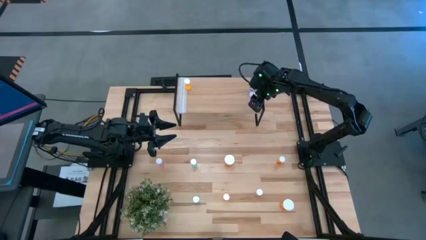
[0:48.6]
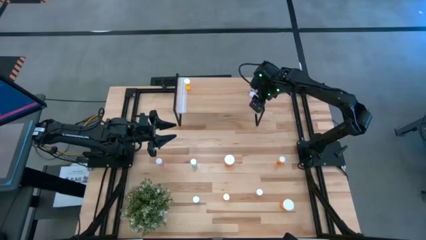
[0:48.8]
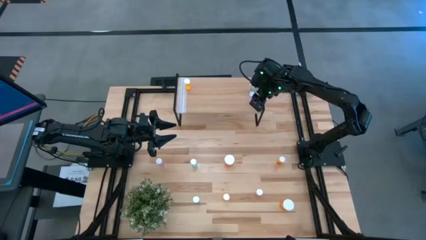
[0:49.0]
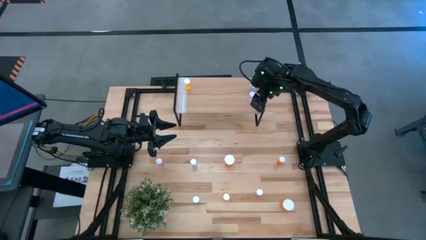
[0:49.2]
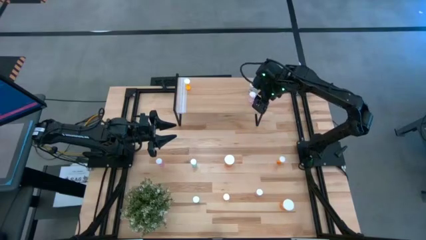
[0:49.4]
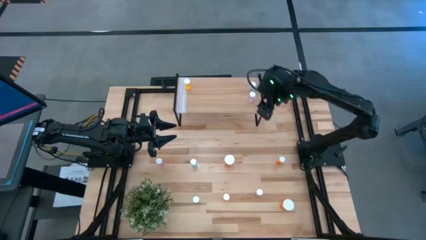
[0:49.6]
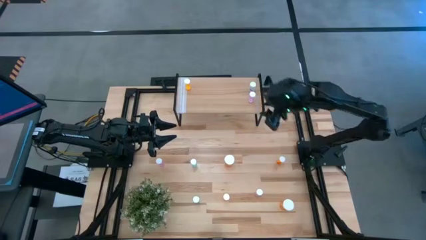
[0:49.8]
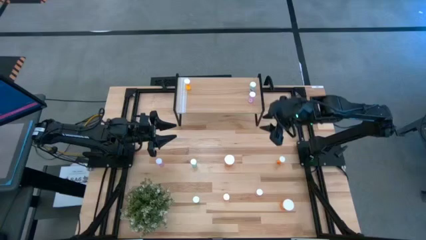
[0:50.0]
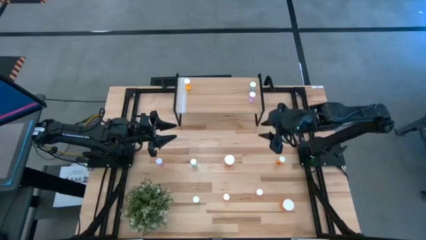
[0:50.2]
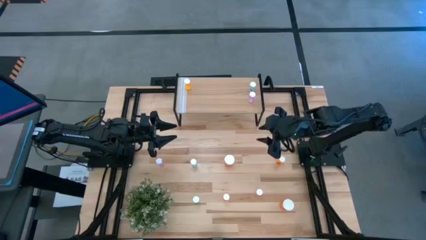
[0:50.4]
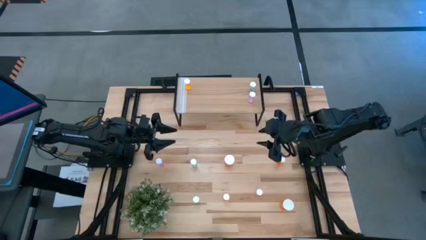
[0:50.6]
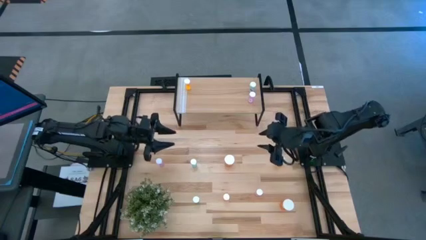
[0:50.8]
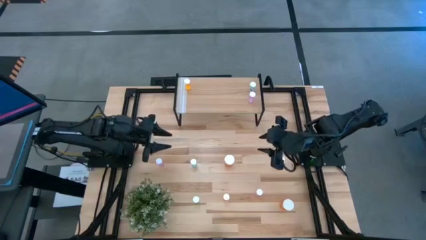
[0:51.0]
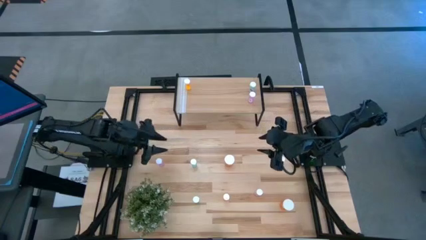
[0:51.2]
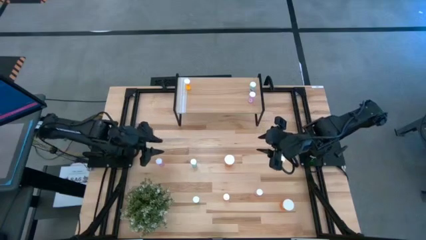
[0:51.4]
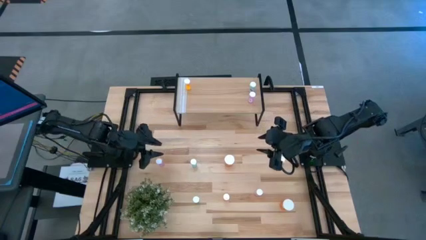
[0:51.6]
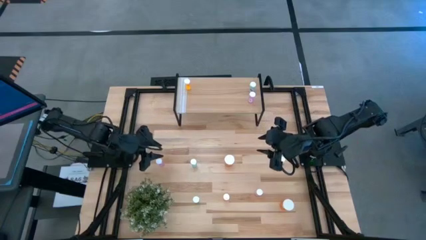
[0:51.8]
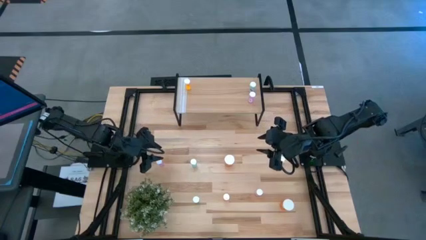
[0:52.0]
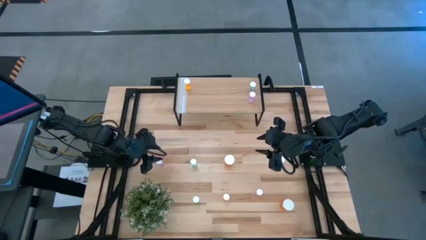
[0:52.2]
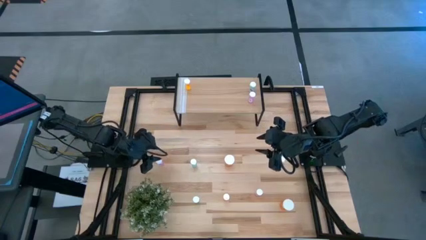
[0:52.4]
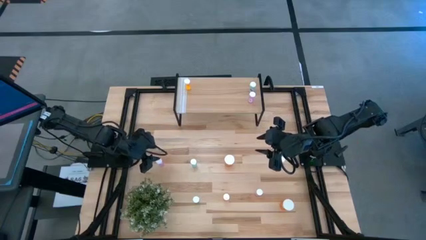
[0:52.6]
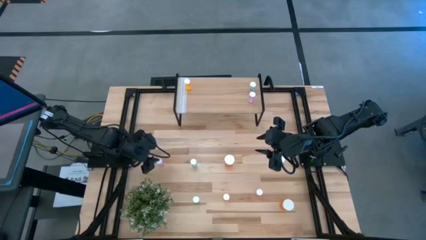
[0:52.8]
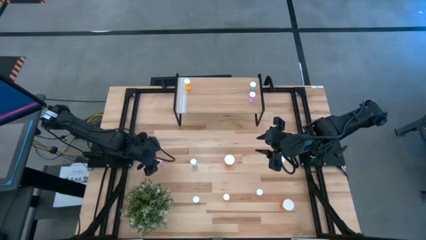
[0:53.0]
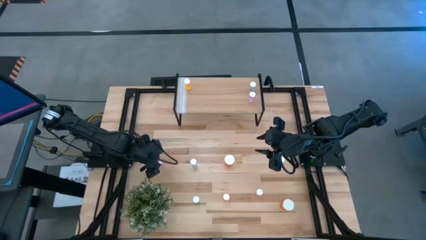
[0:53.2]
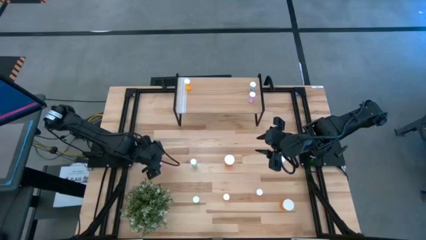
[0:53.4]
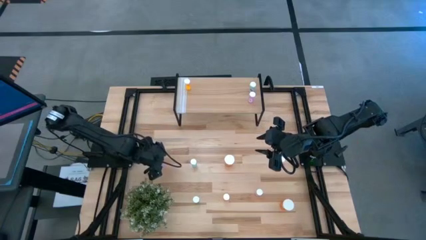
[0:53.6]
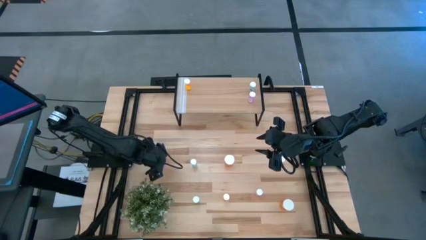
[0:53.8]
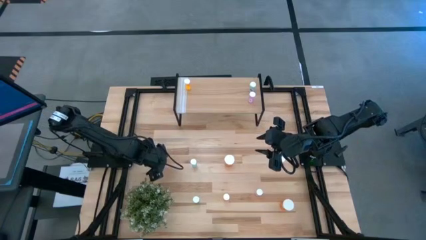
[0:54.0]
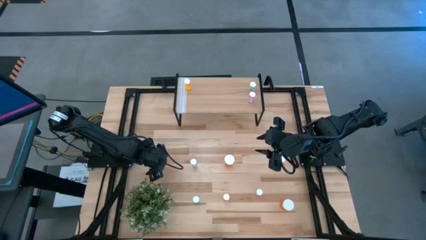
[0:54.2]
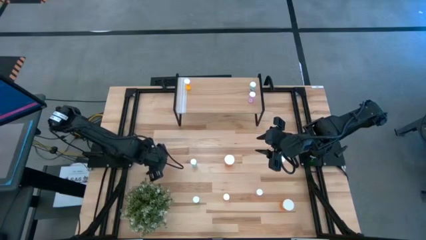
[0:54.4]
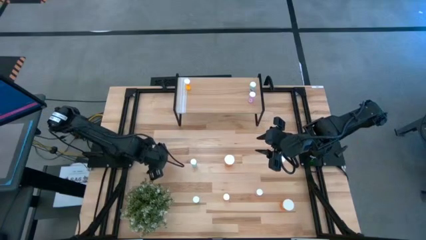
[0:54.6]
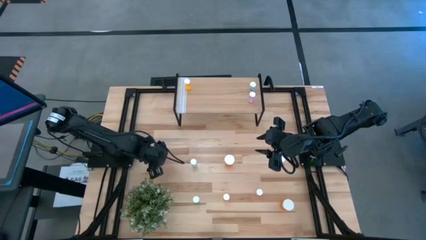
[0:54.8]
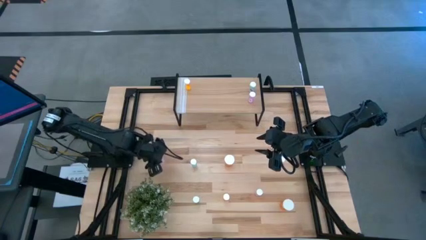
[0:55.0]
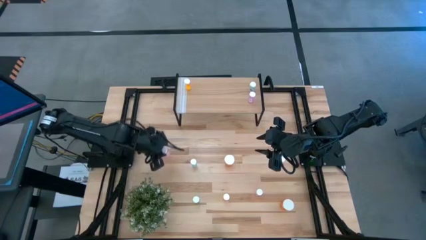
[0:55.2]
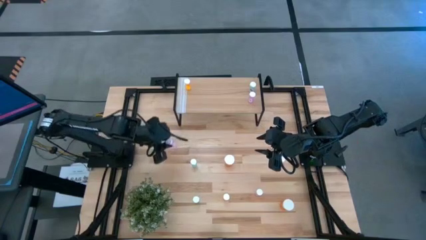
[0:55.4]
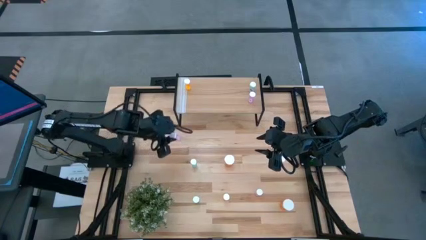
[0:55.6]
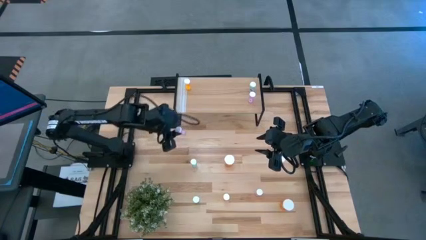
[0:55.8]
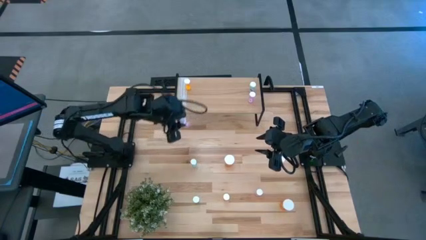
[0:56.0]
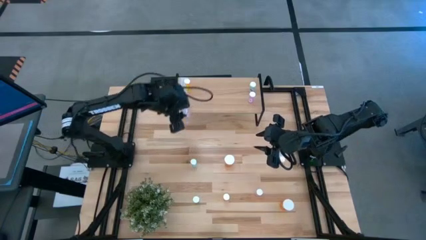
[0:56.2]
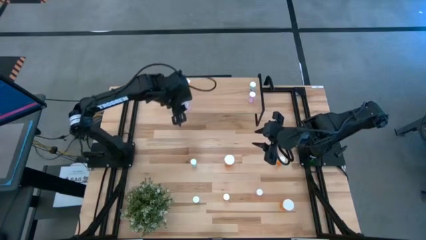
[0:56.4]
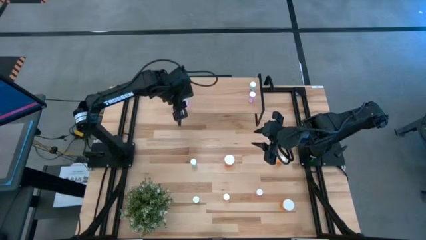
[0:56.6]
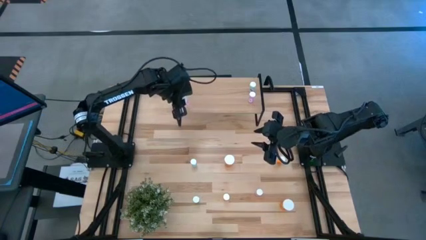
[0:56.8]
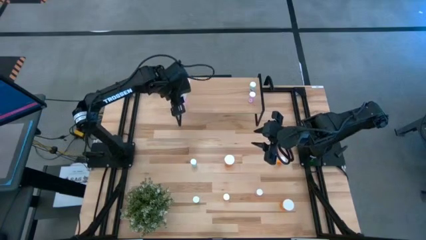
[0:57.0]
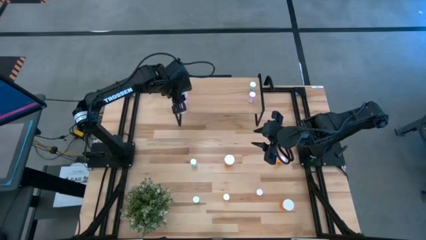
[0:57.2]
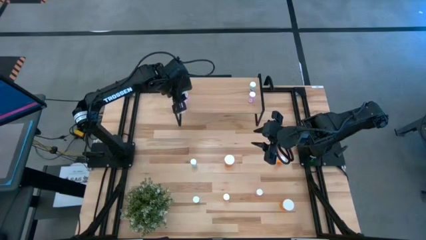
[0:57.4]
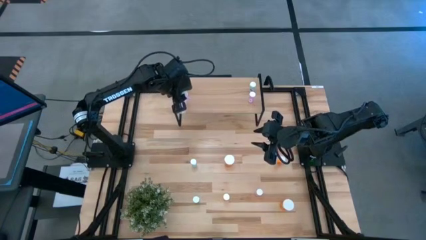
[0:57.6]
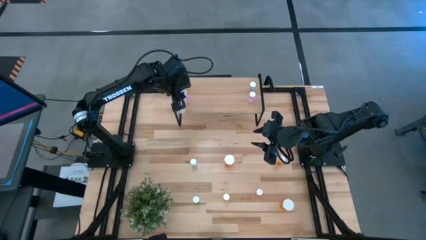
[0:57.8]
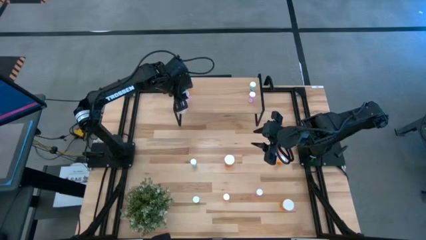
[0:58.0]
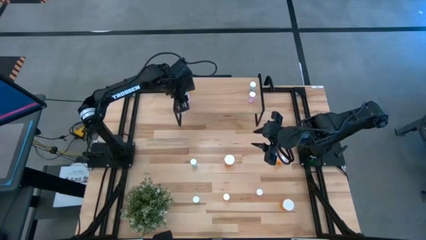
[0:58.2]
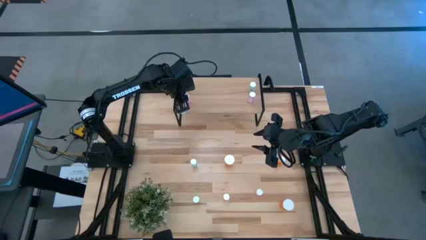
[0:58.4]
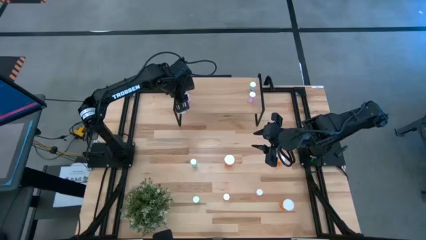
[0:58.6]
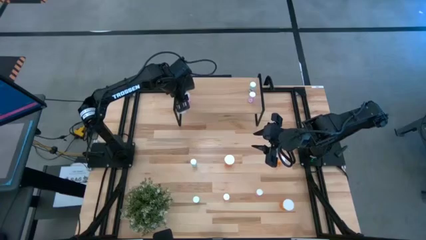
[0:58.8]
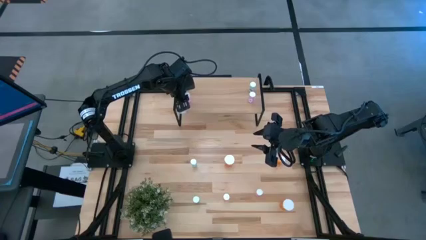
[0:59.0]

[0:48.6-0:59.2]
Task: Pick and place medicine bottles onto shelf by color
Put the pink pill bottle on the shelf

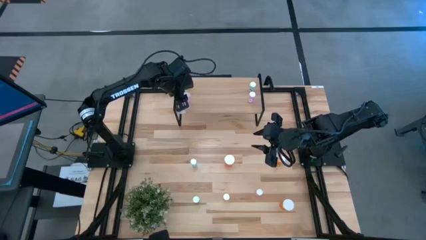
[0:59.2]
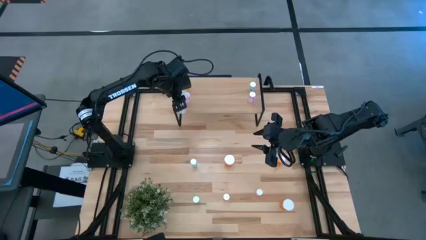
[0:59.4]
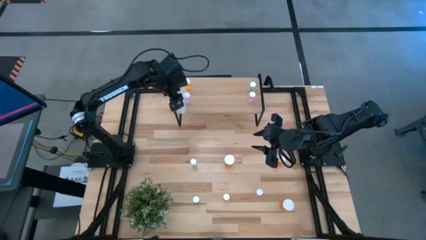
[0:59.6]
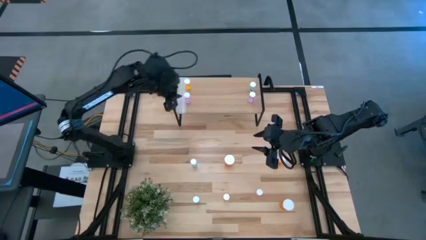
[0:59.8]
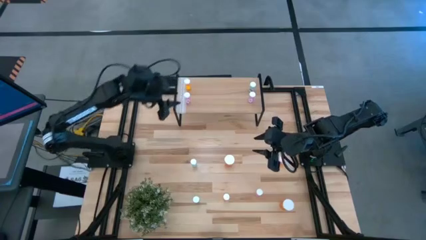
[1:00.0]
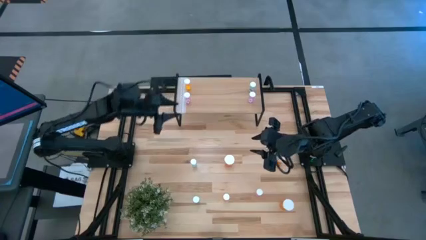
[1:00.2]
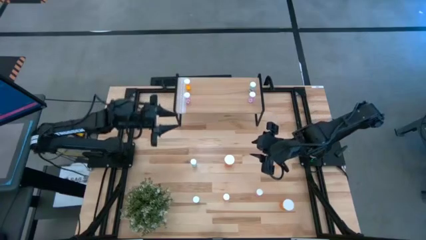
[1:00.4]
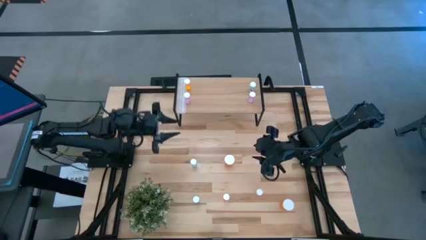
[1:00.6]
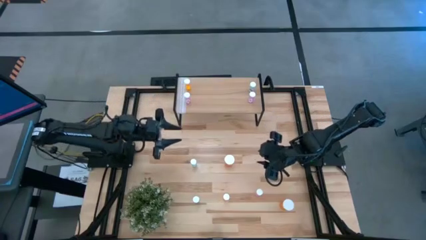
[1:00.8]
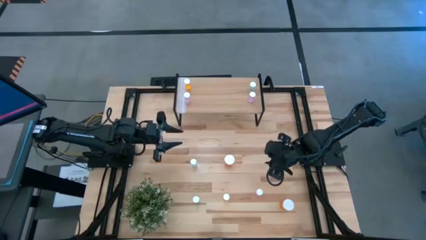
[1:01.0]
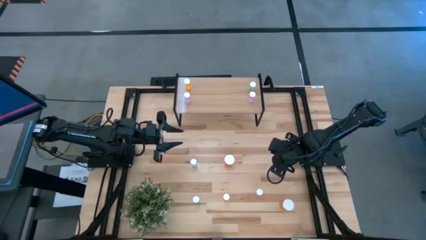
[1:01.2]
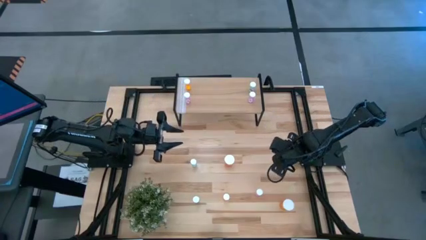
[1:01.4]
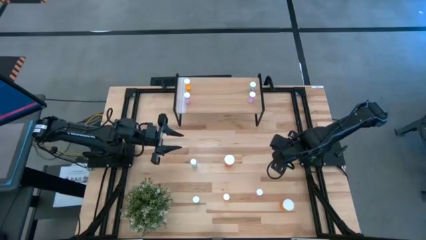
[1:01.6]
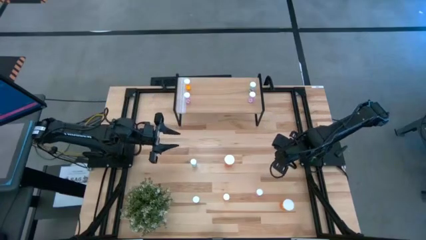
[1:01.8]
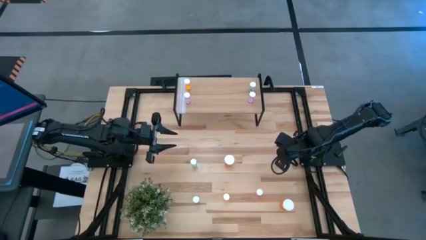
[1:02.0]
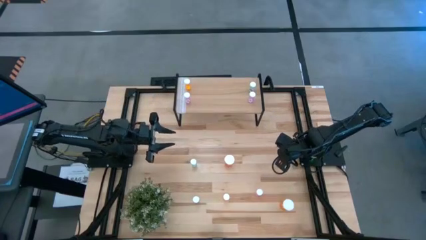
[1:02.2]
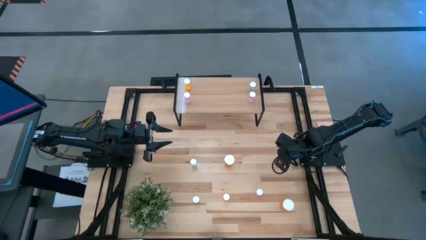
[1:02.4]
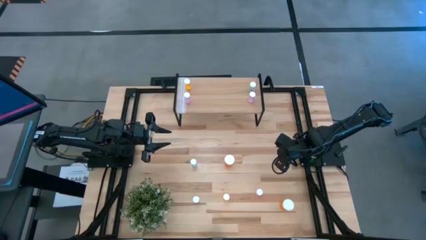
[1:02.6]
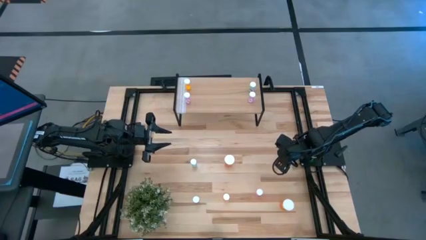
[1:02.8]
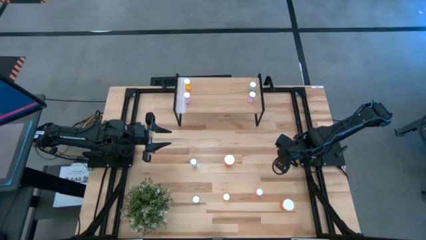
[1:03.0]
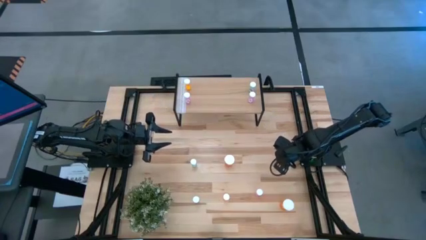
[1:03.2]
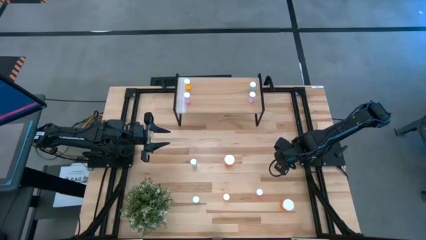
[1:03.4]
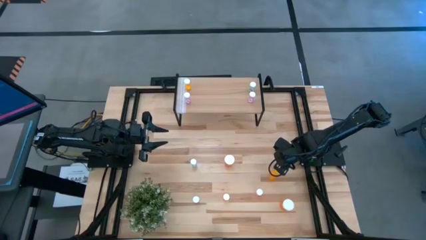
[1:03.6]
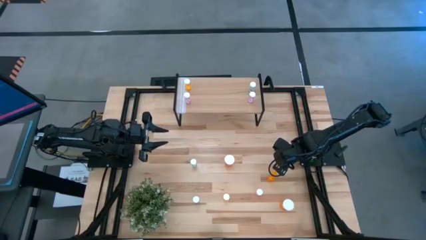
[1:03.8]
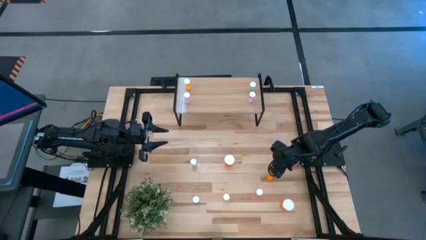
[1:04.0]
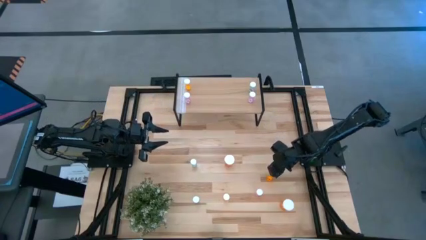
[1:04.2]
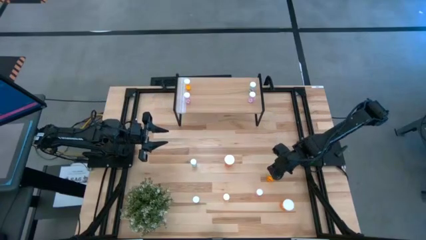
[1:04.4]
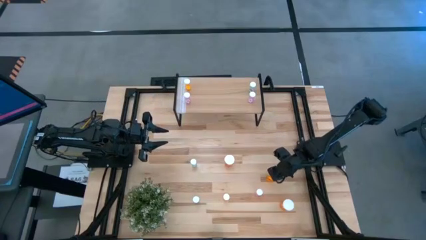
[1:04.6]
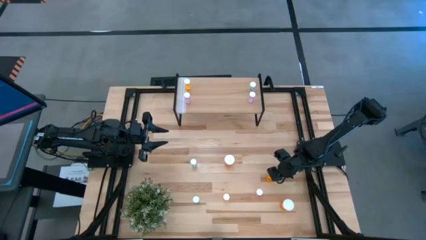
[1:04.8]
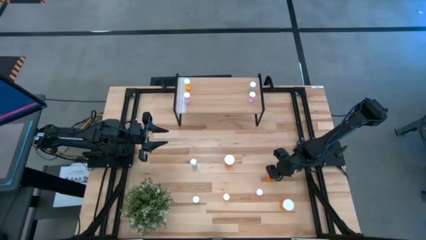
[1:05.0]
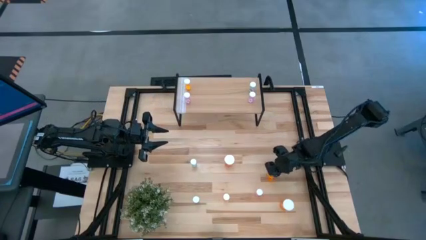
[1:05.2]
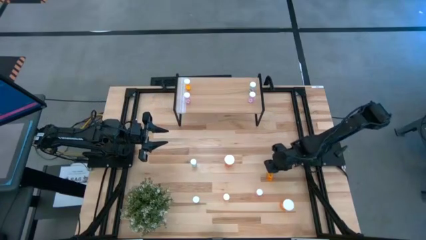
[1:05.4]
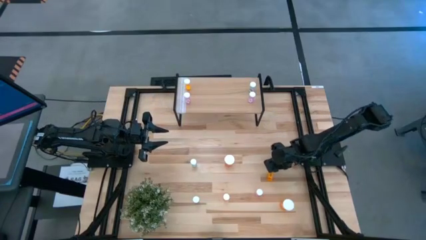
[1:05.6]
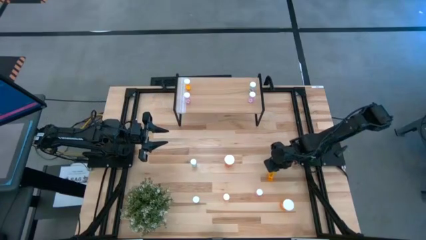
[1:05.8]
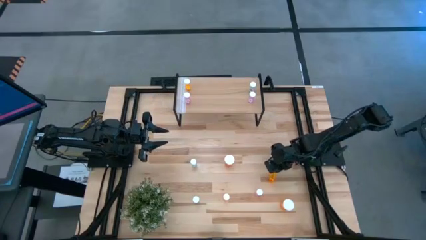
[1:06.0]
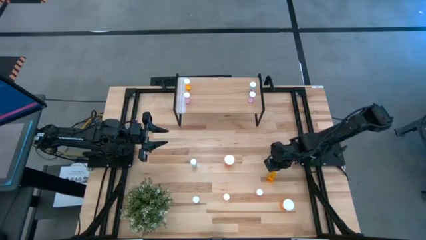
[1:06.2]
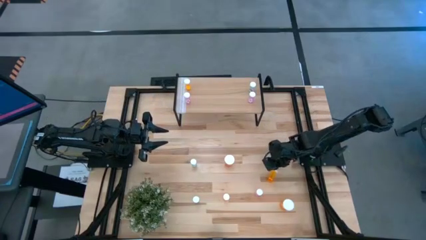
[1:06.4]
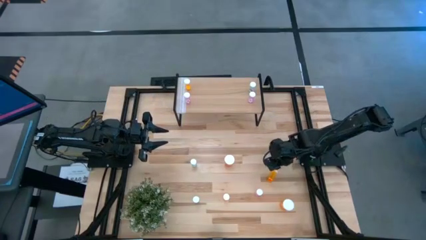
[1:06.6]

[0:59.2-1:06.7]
Put the light orange pill bottle on the shelf
